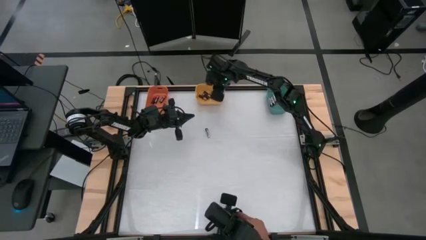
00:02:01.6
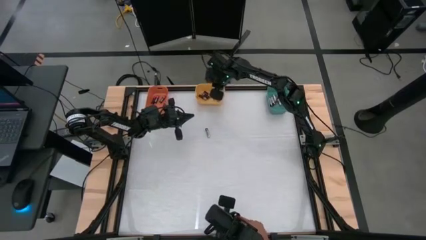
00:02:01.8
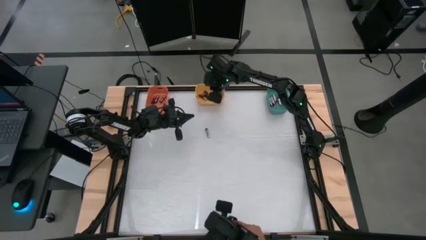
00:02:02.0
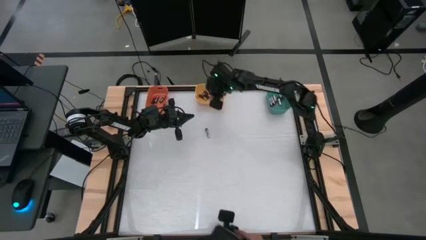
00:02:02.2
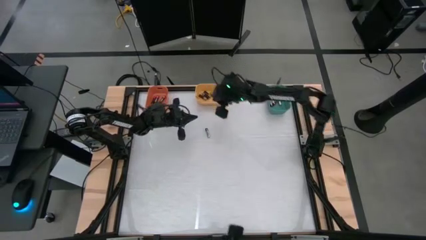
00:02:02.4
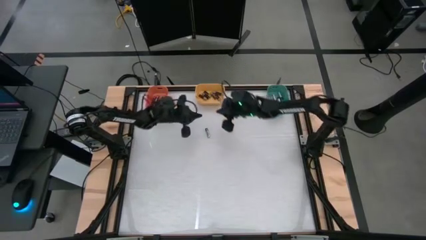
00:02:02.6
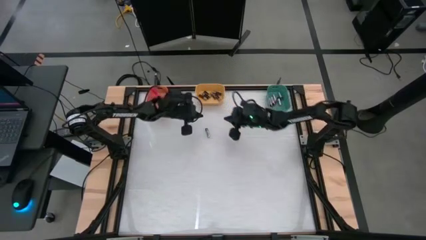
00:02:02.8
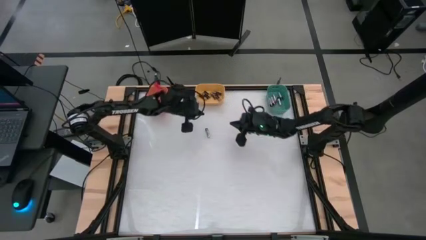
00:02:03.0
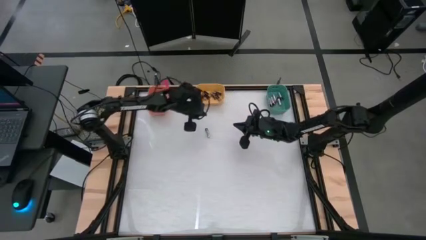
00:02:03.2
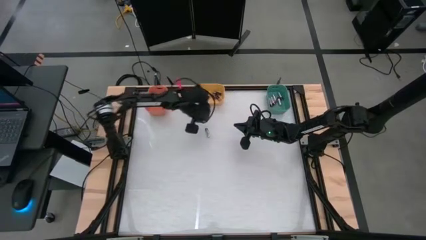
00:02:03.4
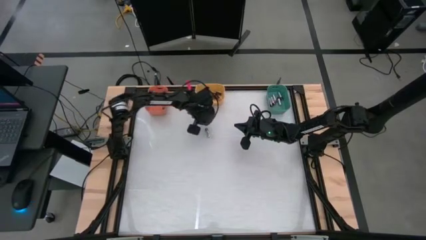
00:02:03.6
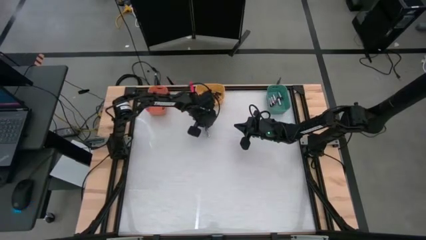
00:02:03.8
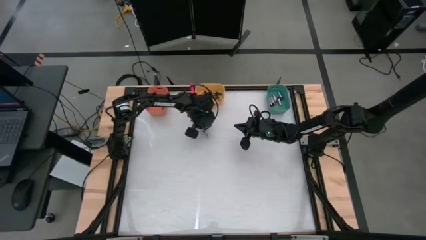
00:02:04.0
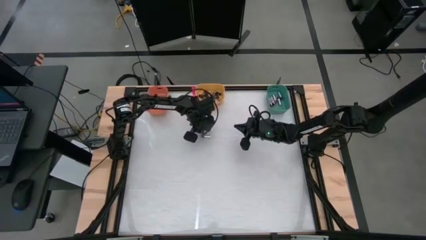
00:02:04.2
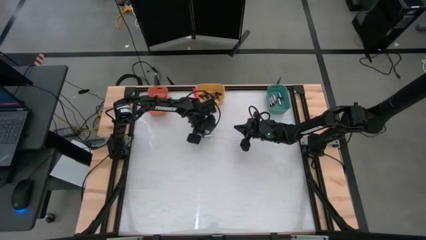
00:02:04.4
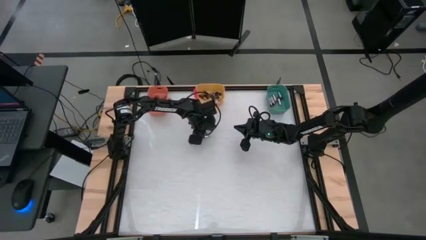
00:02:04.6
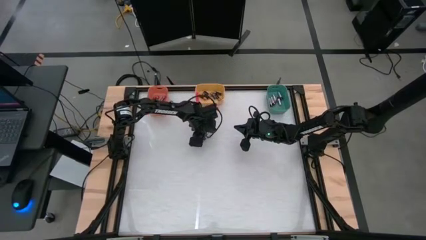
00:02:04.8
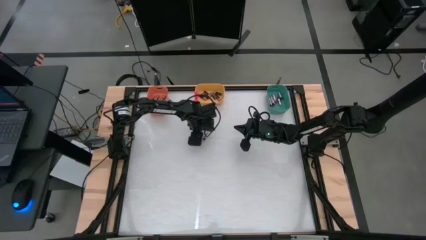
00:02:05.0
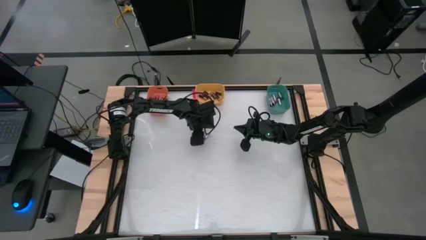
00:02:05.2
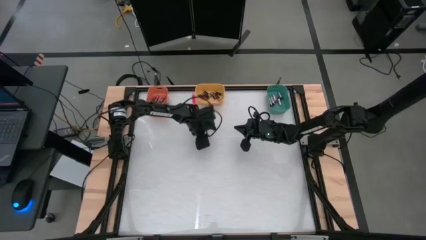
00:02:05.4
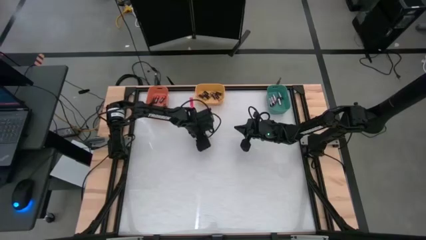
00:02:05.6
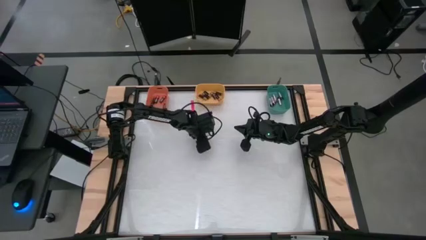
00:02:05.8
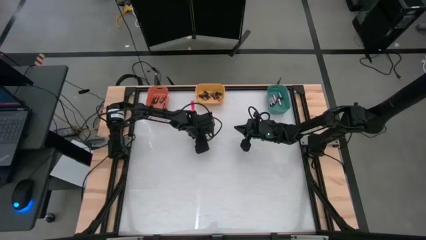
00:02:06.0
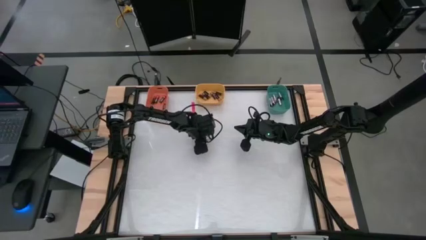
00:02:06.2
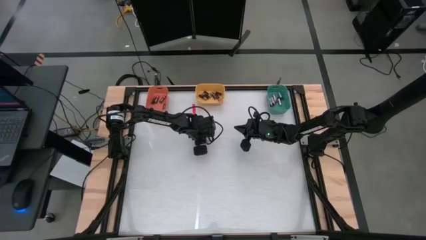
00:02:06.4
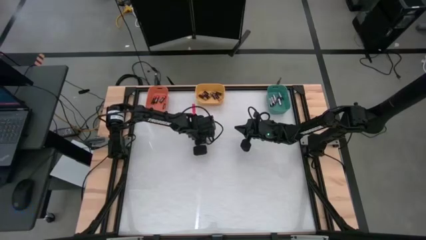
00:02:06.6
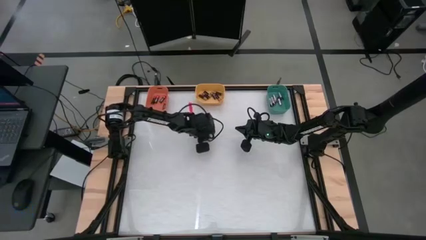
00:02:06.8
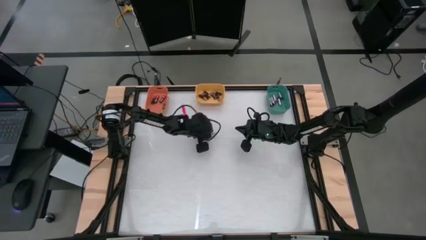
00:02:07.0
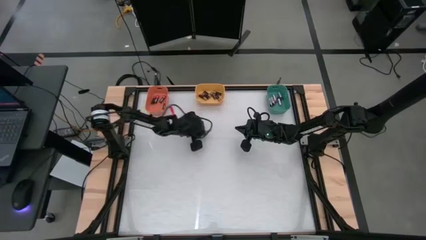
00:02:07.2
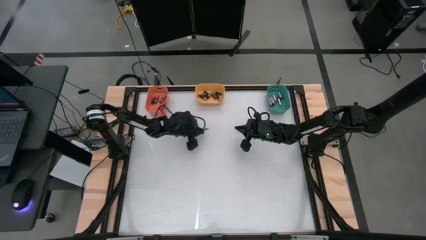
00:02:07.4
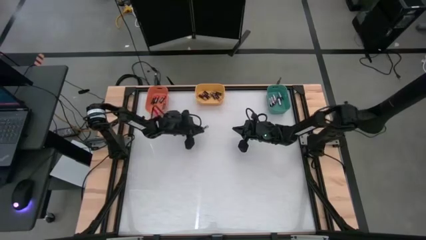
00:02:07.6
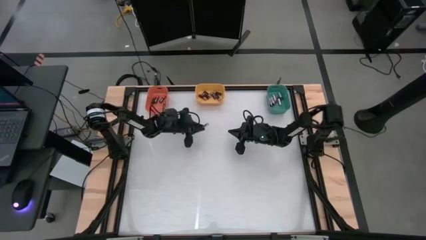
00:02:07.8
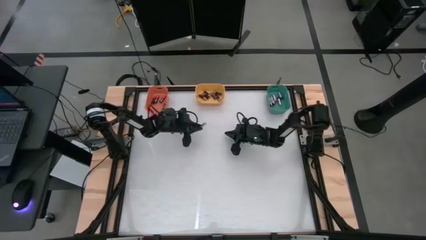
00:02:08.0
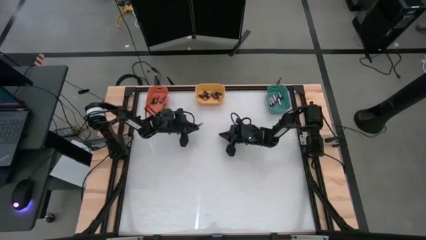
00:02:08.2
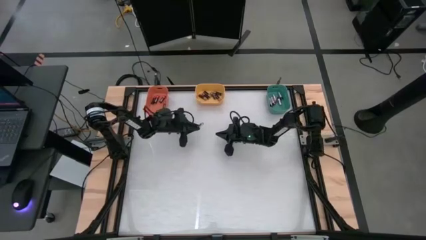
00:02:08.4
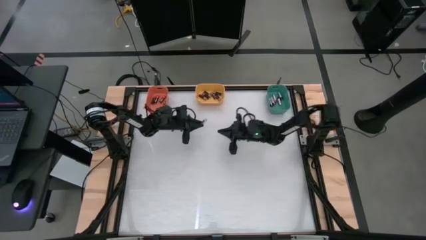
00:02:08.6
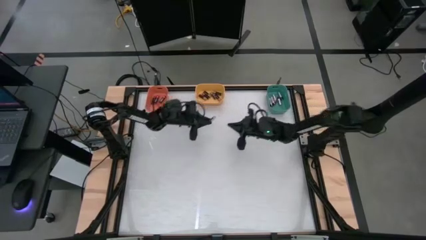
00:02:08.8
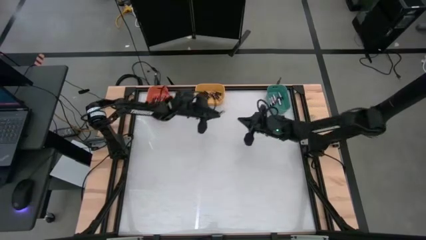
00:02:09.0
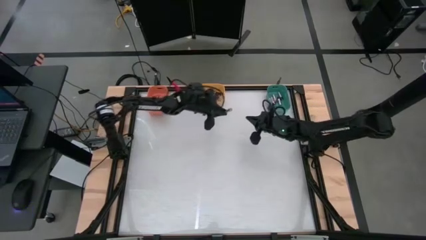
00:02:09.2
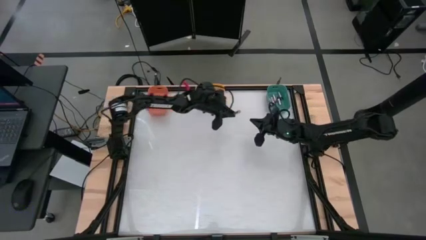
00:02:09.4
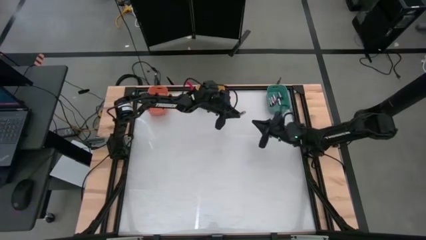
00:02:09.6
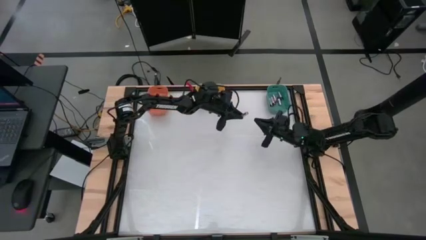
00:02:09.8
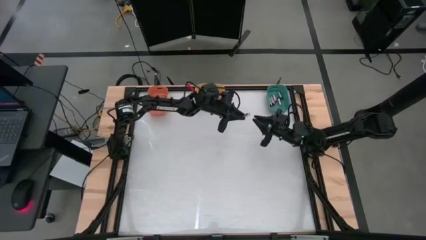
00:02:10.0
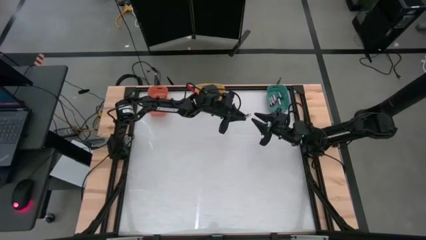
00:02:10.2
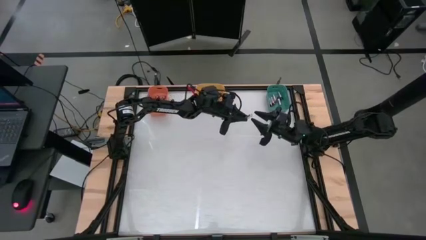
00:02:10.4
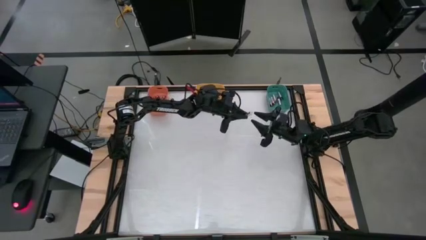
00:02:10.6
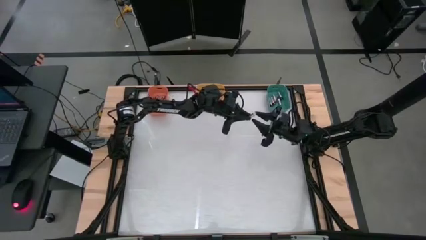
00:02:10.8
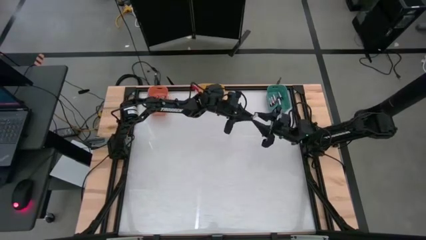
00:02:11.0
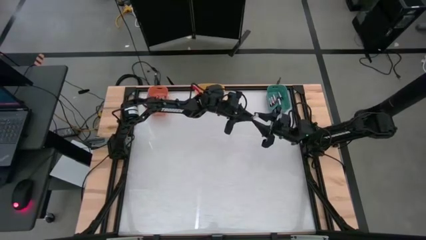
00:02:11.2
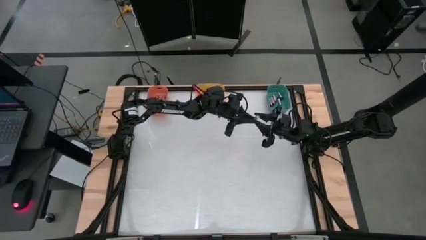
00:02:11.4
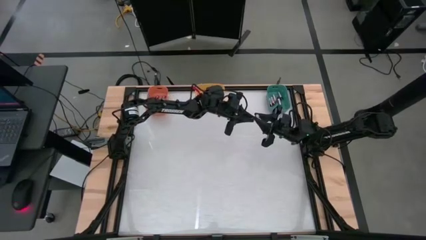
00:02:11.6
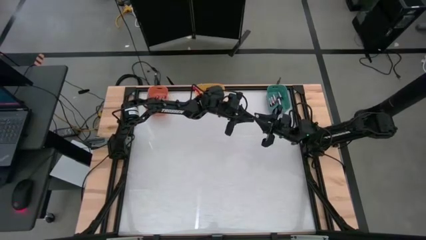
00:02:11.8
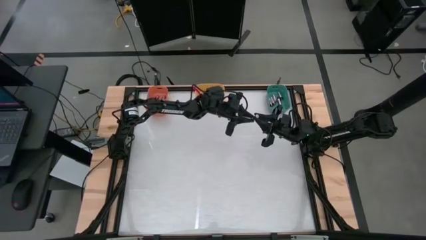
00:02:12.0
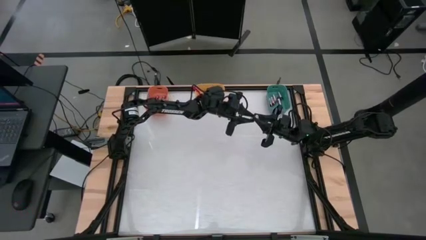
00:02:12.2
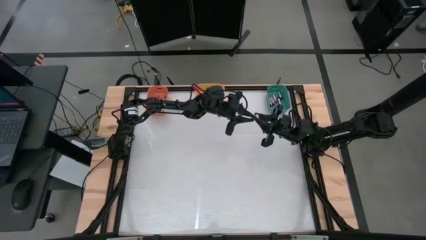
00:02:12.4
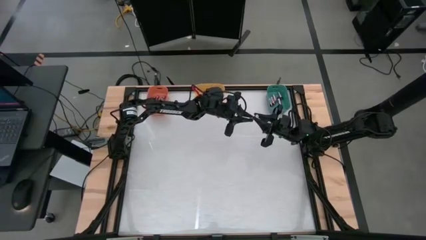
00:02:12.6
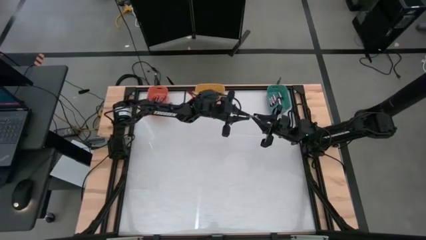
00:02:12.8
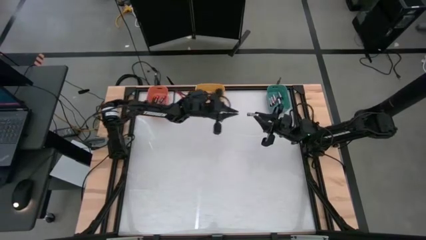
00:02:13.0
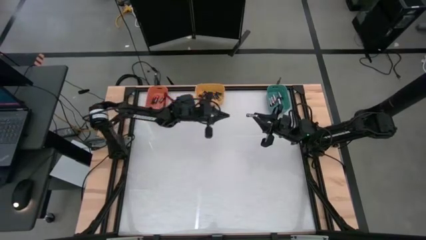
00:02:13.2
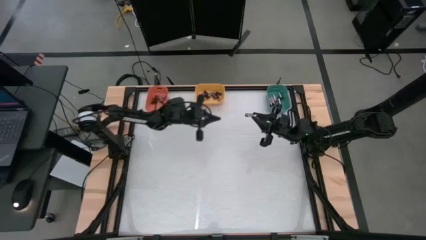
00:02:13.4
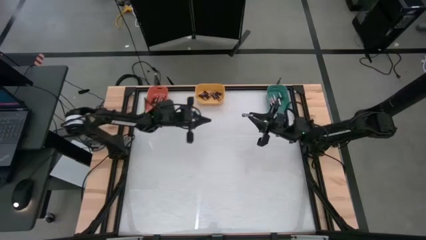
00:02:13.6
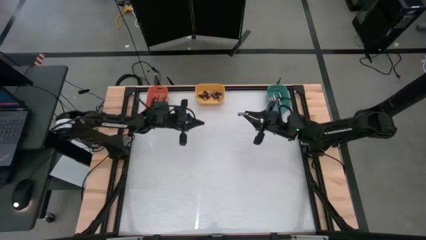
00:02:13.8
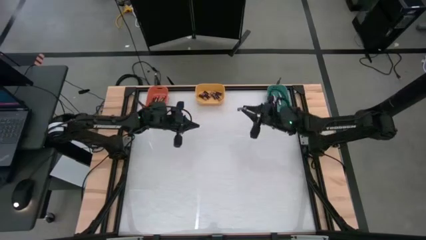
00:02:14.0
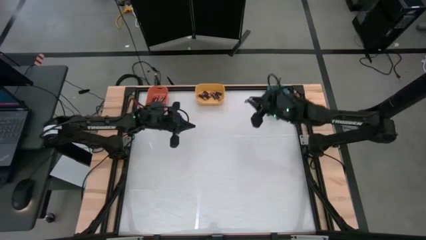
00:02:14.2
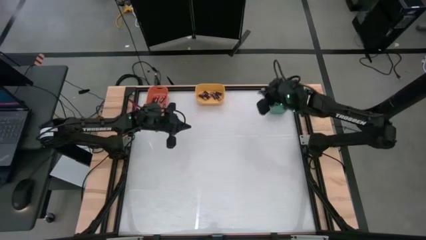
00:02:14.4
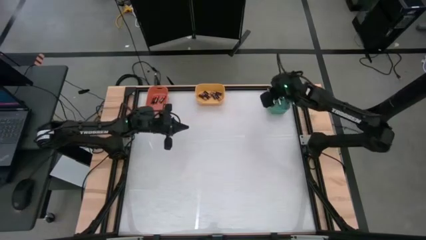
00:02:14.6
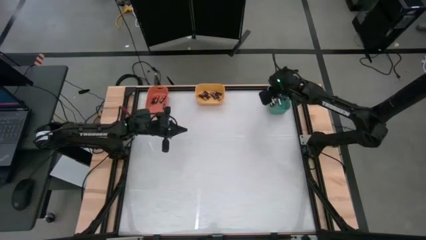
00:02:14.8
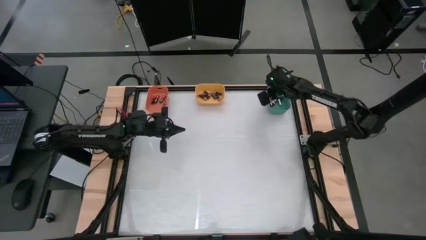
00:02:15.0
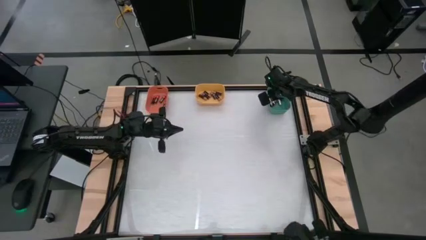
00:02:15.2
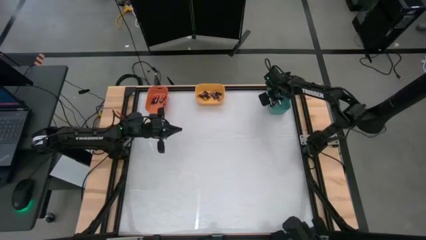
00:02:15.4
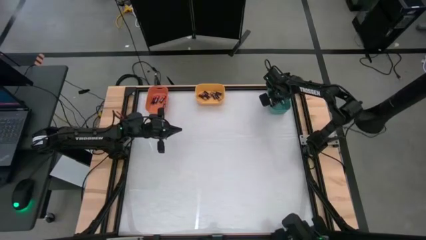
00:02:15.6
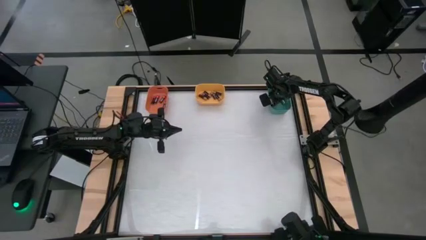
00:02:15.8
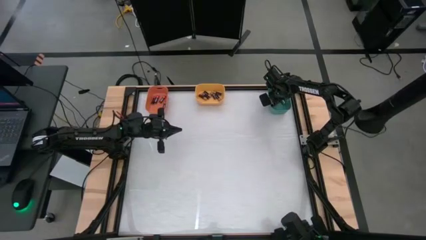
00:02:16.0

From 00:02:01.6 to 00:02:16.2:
Task: Sort batteries
Put the black battery into the green bin

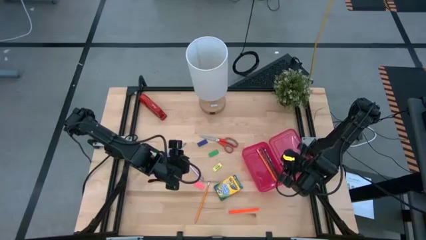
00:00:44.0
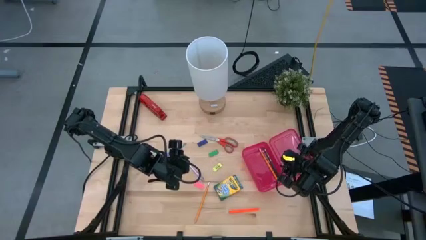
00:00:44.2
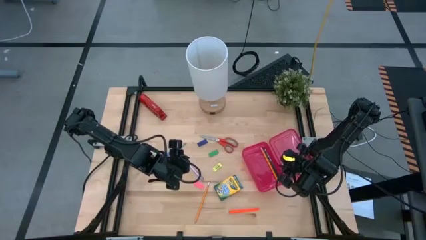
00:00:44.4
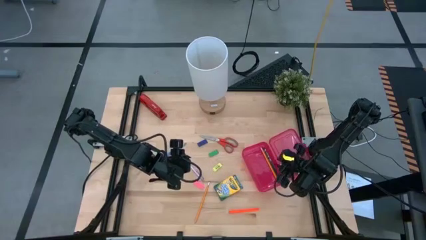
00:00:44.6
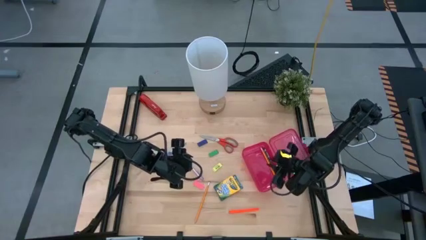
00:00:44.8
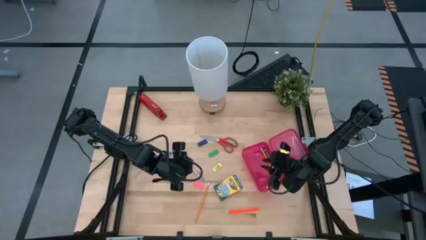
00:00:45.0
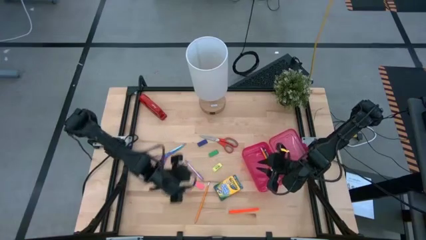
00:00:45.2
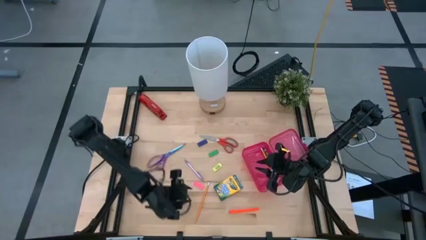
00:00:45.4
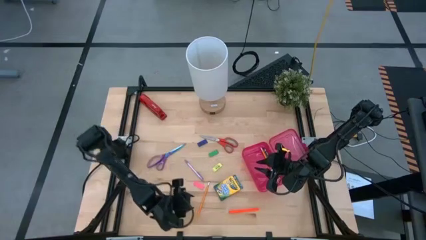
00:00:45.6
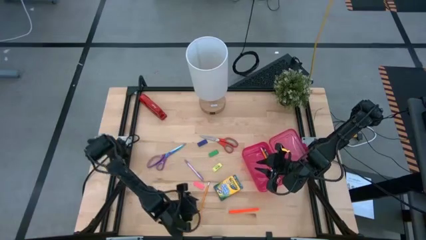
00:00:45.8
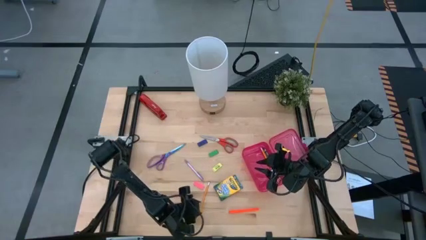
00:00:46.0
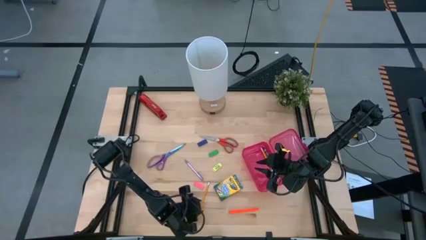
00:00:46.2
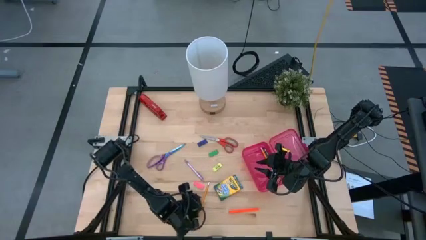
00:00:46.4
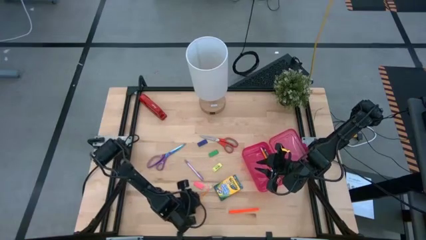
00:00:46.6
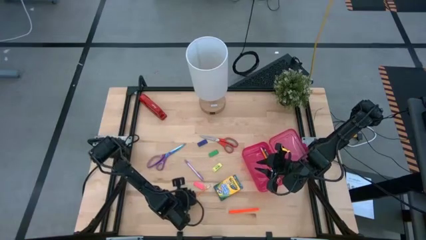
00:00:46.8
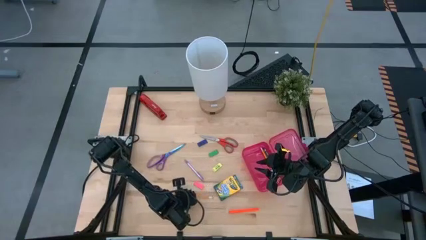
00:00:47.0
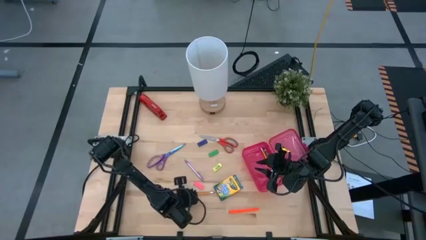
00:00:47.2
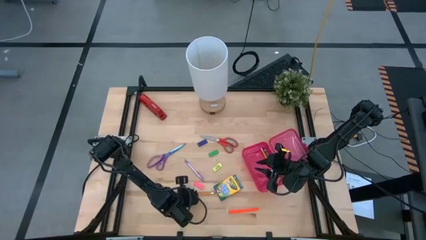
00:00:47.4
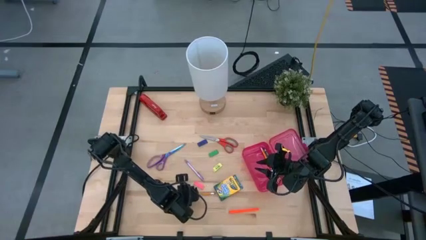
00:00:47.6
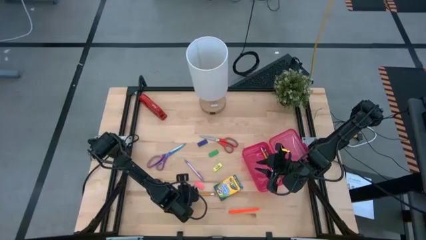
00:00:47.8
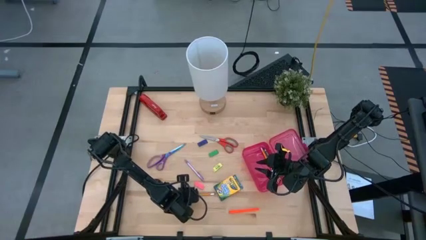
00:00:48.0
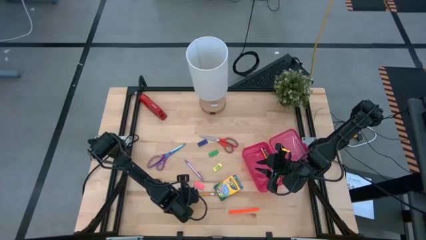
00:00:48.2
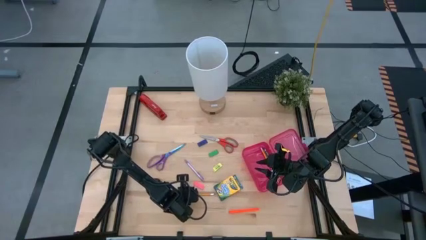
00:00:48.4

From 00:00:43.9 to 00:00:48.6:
Task: Pack school essentials
Put the yellow pencil into the pink supply box
